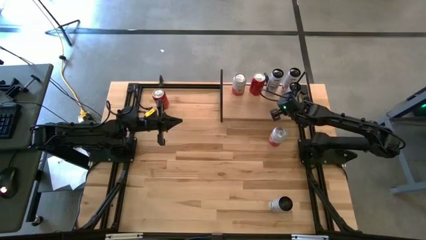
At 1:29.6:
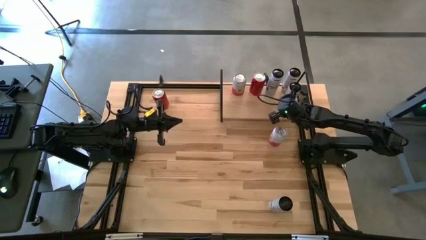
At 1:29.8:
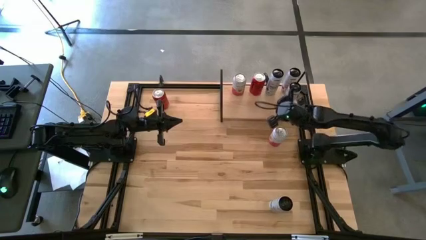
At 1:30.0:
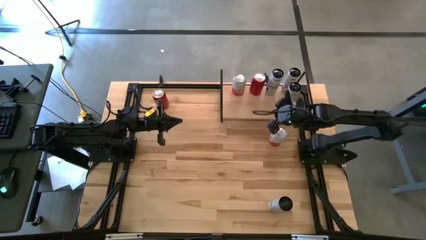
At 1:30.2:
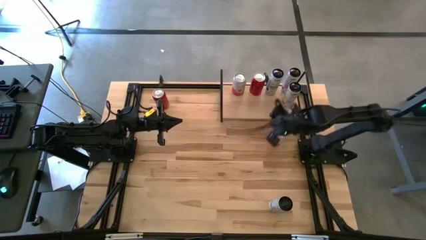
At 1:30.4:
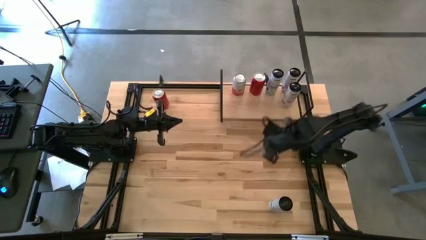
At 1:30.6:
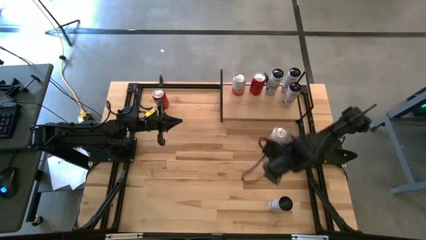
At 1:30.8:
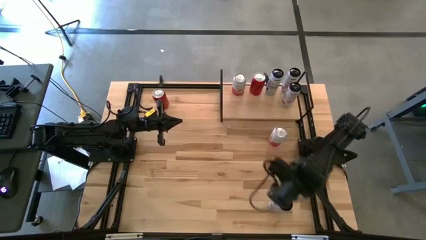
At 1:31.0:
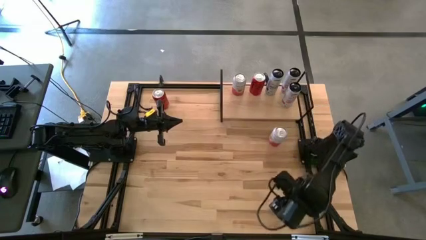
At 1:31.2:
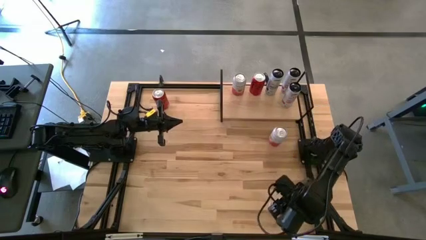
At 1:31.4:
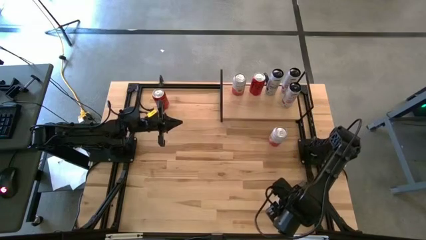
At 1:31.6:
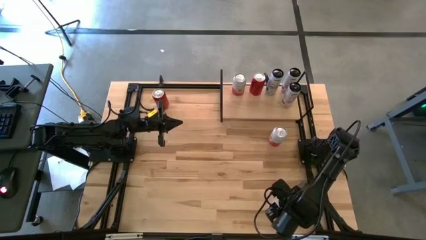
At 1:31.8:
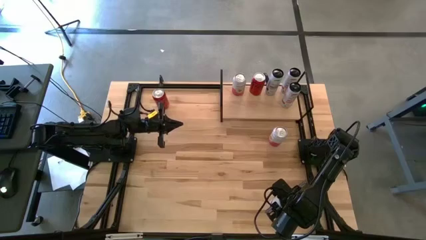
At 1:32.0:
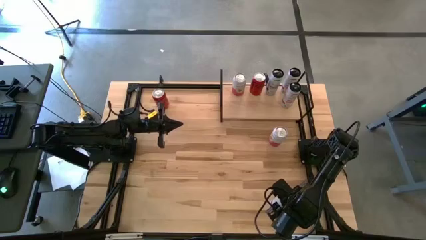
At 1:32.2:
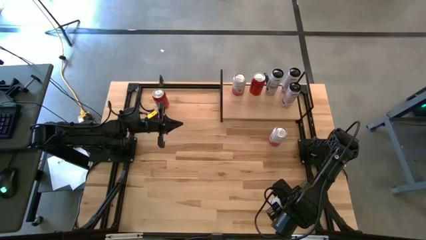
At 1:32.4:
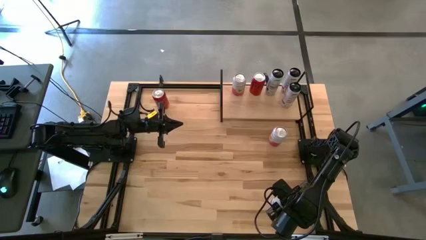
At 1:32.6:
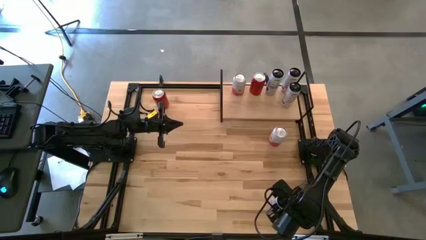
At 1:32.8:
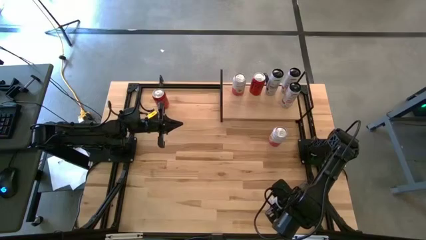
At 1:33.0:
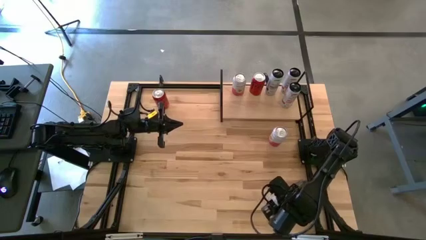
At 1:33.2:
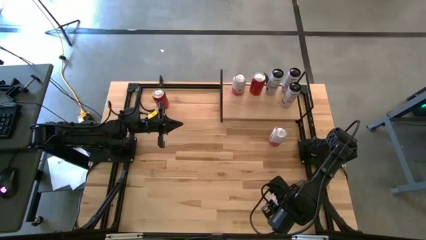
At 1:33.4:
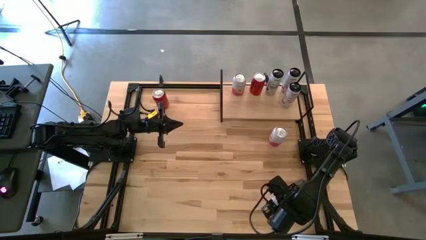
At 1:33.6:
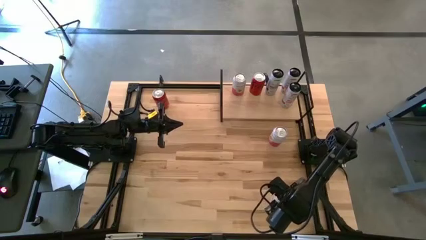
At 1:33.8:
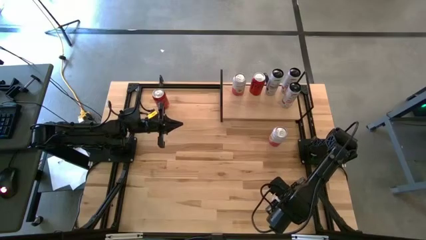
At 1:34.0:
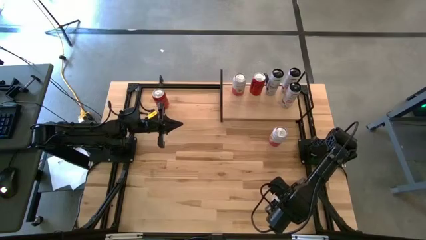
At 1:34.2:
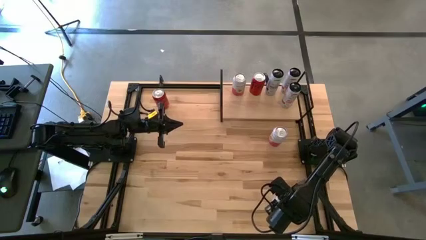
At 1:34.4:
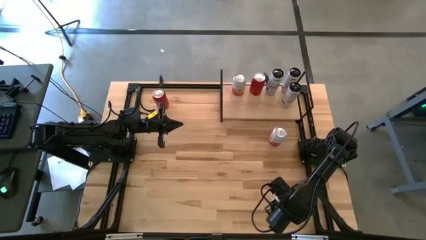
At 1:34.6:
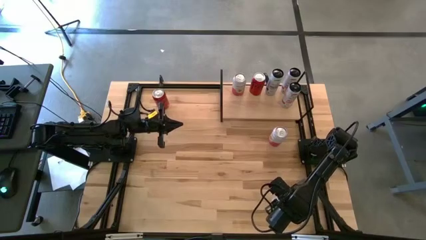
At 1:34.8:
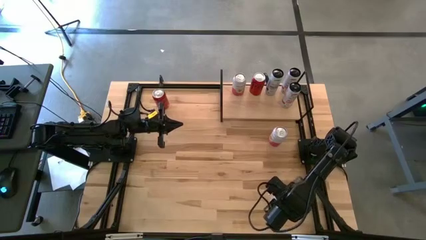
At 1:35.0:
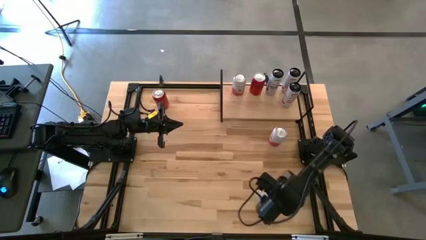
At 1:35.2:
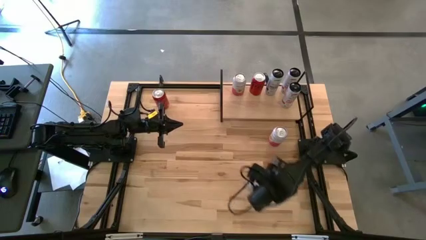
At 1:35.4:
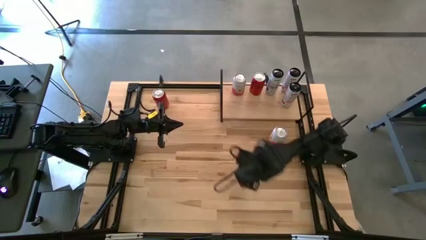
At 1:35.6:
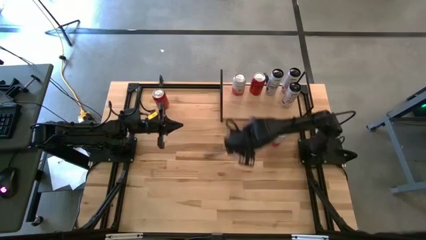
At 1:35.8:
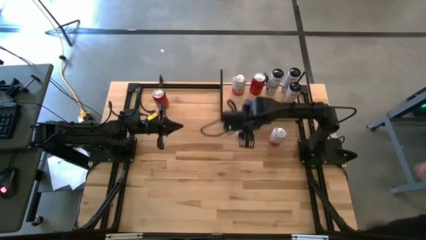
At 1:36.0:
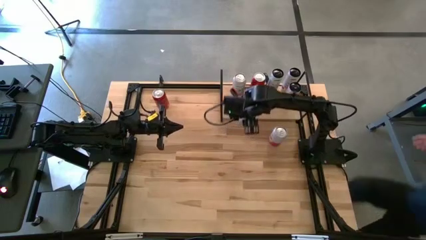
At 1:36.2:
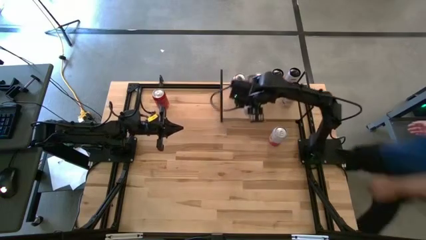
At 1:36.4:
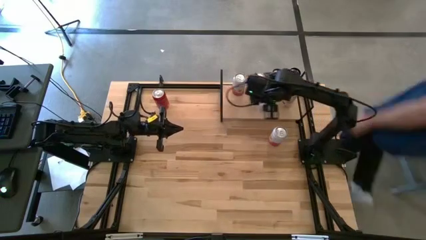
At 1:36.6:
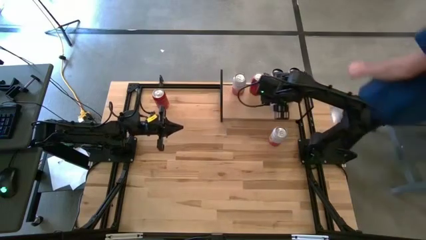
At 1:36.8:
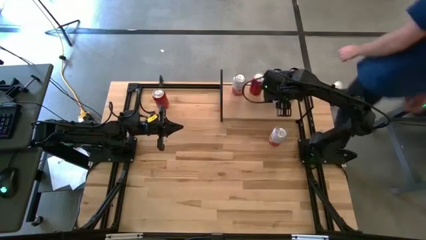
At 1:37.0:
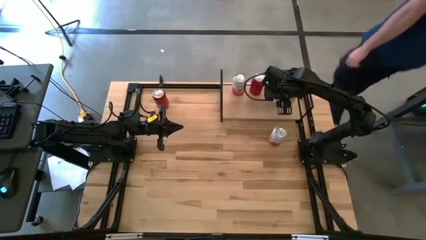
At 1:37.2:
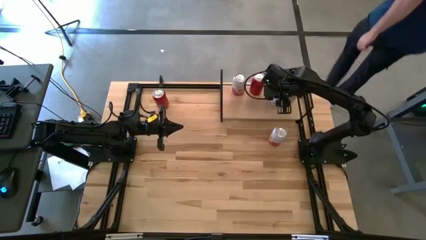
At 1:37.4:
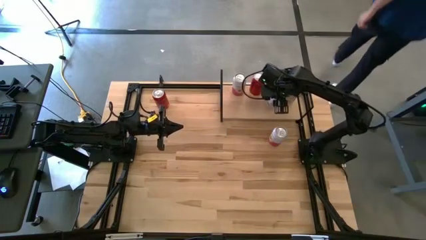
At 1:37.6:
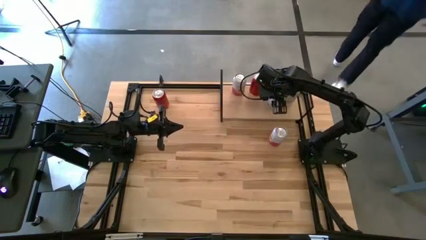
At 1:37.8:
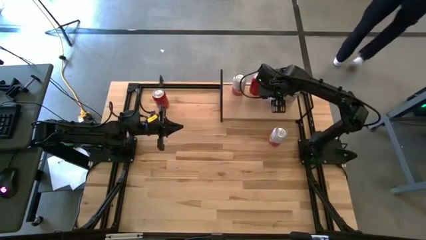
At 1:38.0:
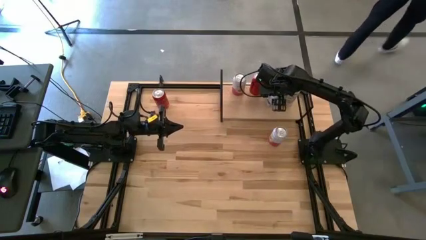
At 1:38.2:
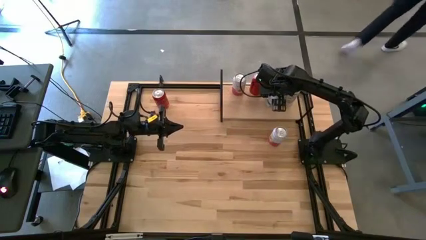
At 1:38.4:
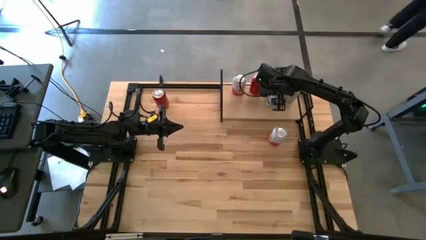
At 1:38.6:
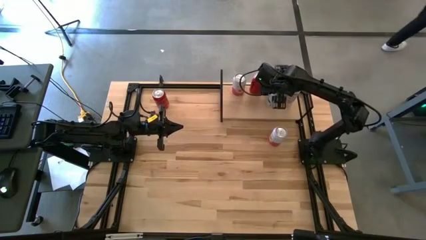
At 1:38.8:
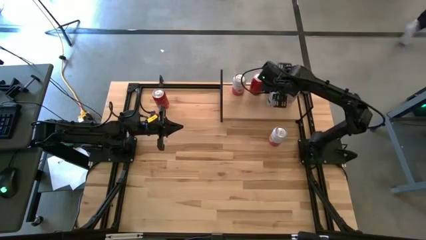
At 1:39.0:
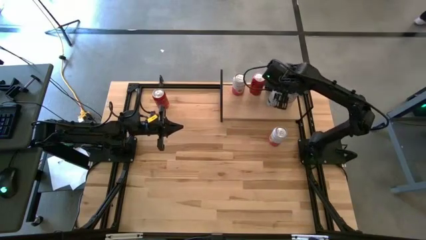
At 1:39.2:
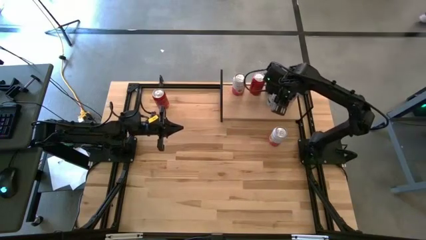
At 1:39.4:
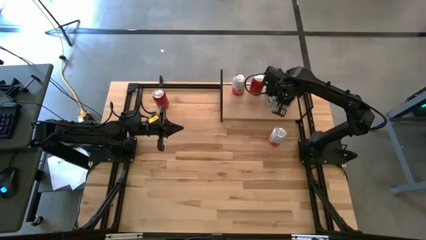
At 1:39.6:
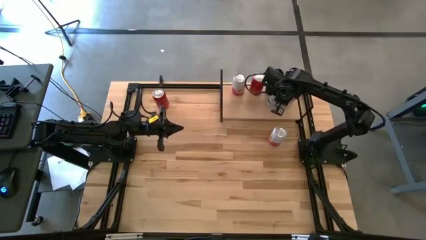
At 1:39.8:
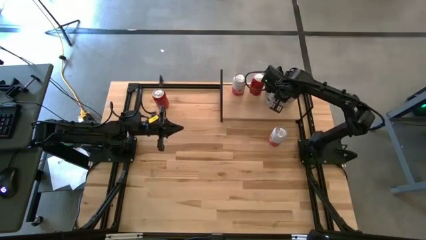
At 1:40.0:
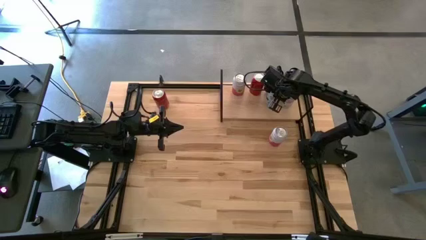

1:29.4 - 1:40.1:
Task: Place canned beverage on shelf
Put the white and blue soda can on the shelf aligned with the other white and blue soda can

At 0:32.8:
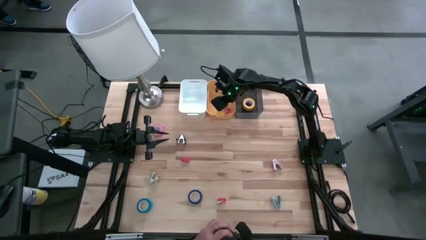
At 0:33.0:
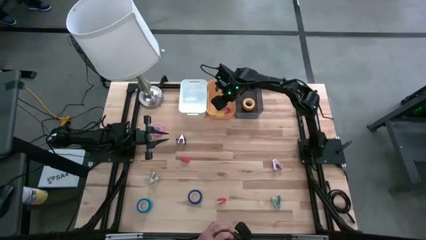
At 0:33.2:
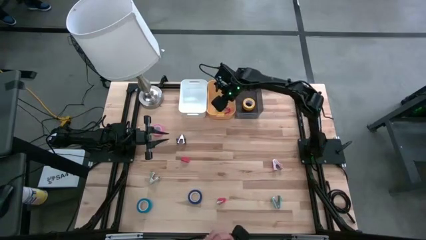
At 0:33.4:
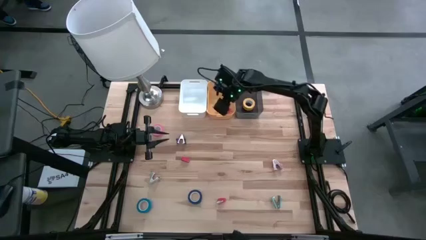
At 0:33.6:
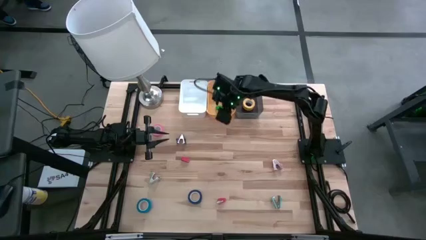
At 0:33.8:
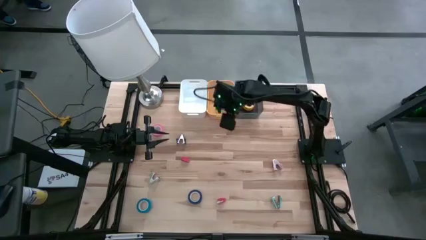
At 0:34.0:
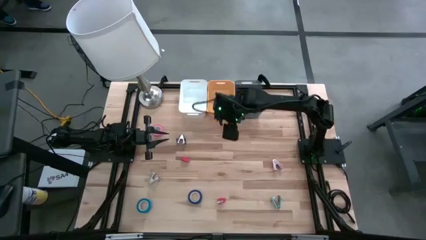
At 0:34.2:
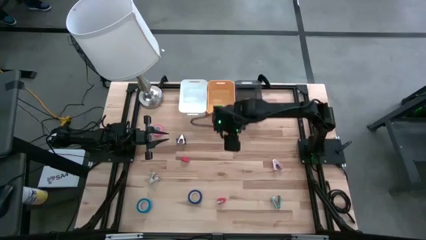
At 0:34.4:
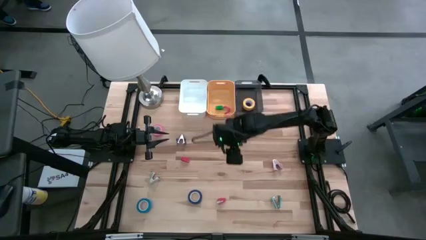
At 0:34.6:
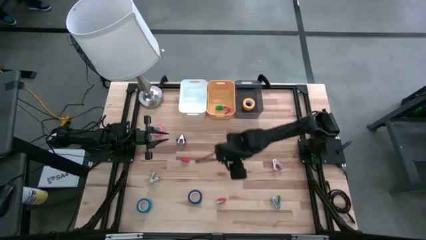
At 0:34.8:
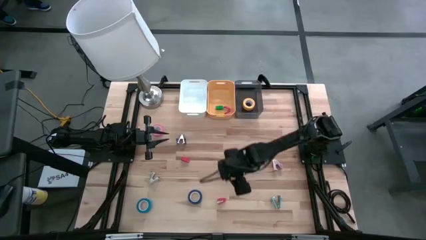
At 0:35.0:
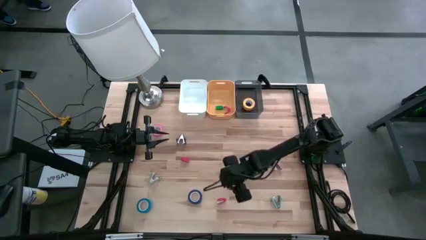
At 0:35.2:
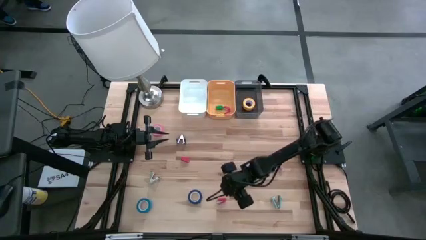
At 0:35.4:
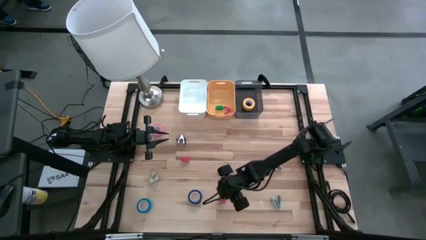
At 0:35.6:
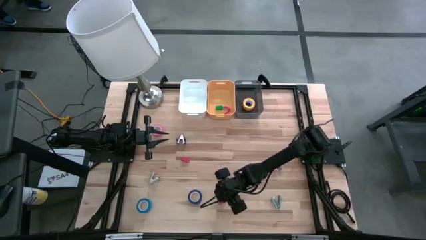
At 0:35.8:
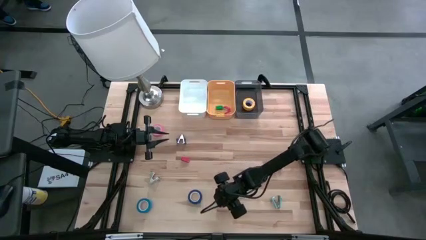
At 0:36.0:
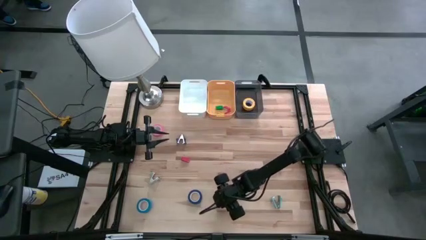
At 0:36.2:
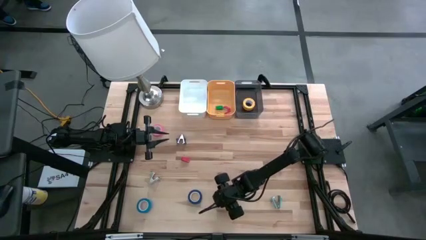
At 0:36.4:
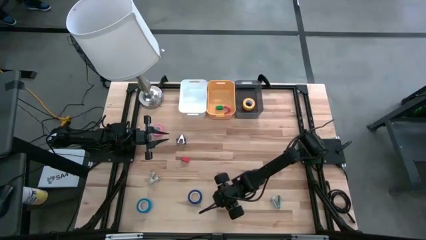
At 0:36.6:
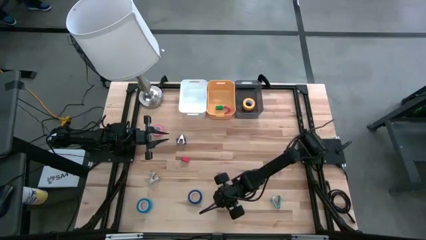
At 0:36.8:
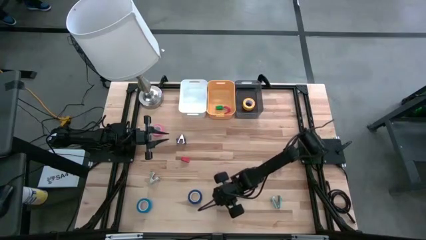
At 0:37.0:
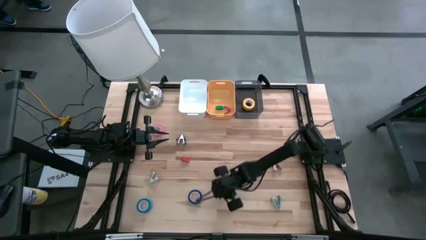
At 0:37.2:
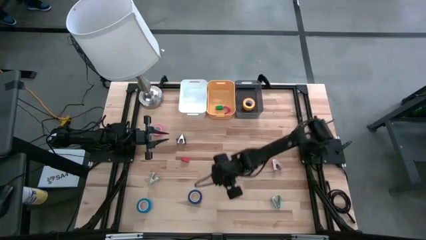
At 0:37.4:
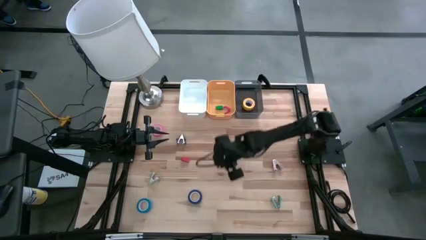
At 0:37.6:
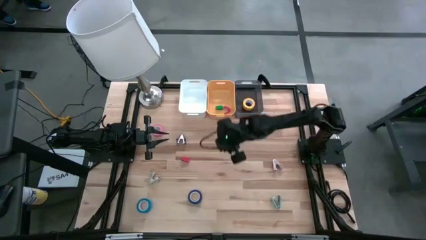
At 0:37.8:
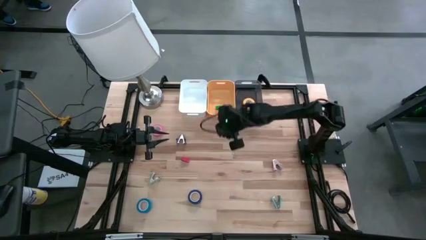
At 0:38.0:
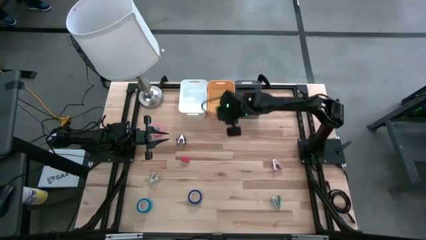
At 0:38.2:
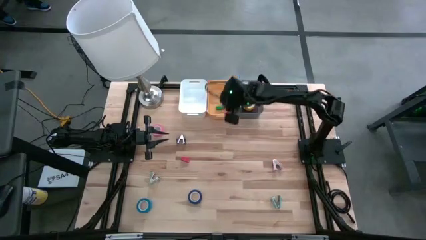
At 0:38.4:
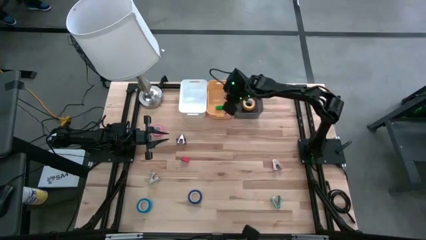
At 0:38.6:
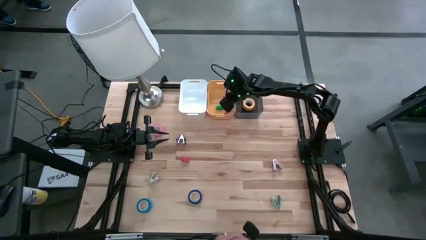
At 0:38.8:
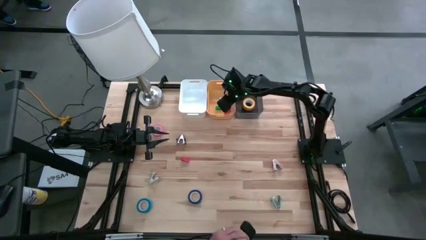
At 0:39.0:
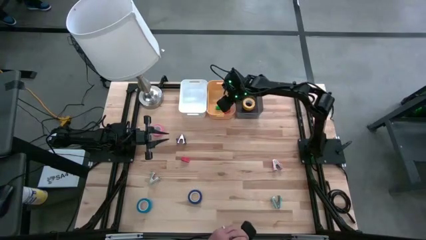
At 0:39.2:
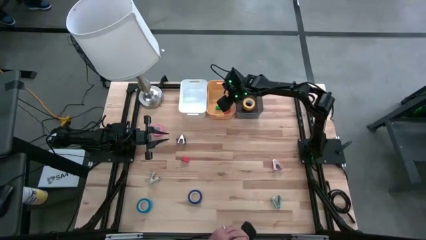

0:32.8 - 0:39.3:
Task: Pick and place Stapler, Stapler remover, tape
Put the bottom red stapler into the yellow bin
